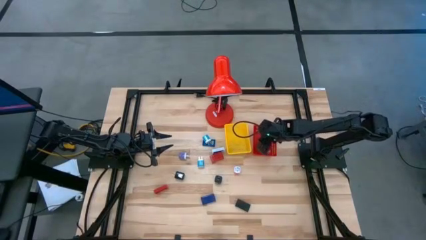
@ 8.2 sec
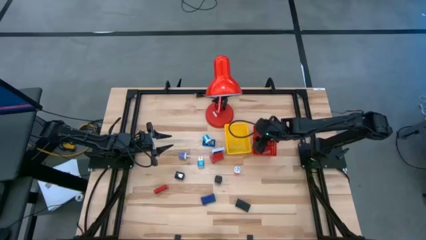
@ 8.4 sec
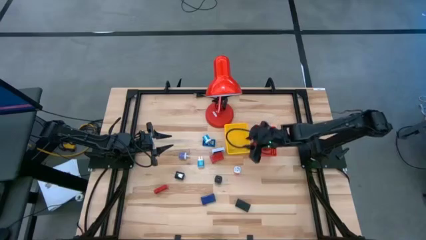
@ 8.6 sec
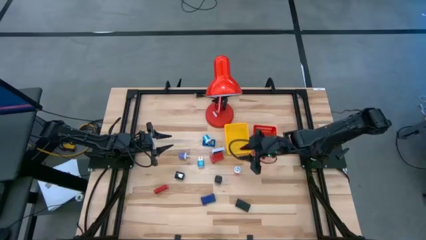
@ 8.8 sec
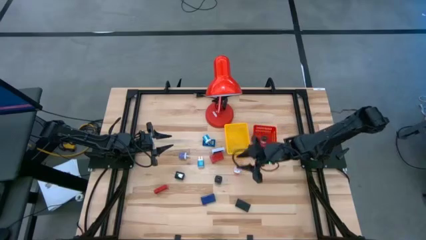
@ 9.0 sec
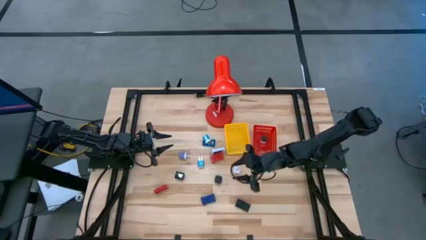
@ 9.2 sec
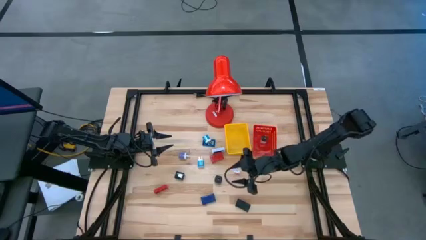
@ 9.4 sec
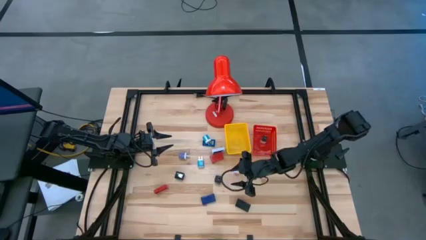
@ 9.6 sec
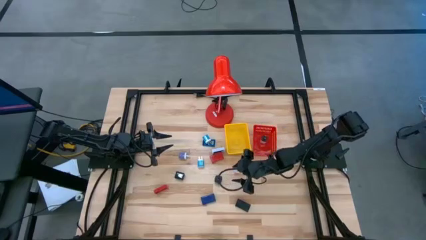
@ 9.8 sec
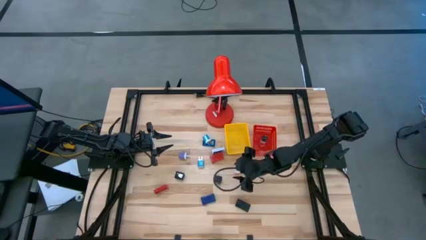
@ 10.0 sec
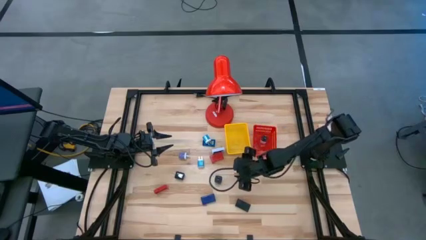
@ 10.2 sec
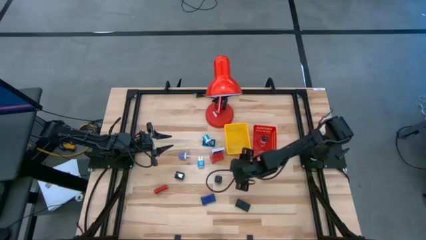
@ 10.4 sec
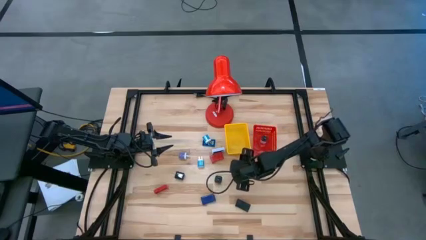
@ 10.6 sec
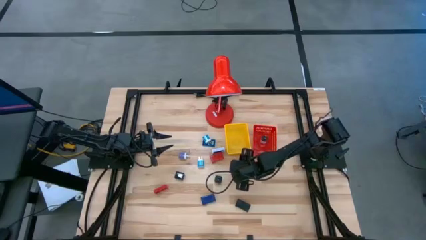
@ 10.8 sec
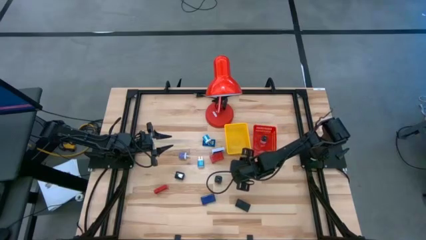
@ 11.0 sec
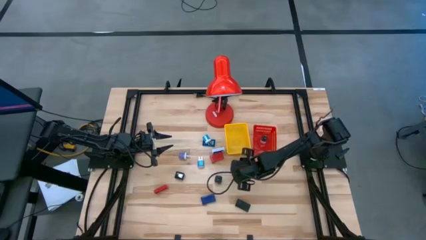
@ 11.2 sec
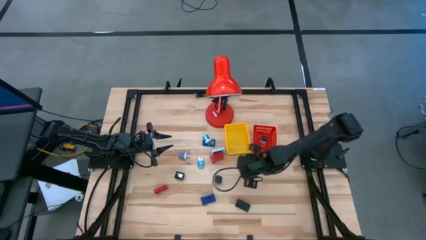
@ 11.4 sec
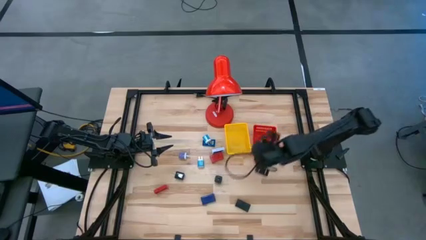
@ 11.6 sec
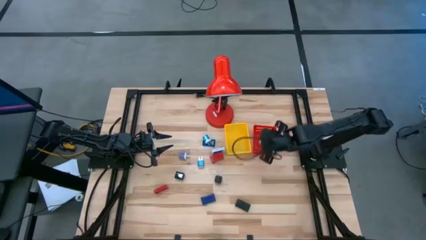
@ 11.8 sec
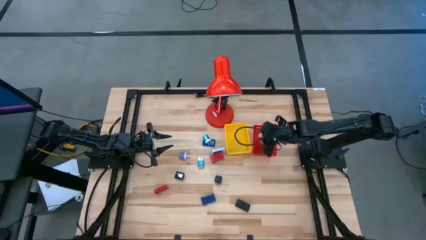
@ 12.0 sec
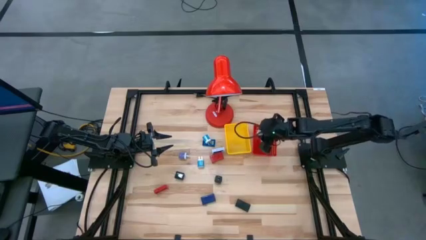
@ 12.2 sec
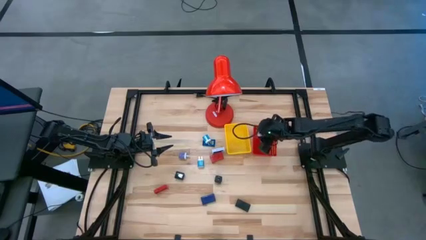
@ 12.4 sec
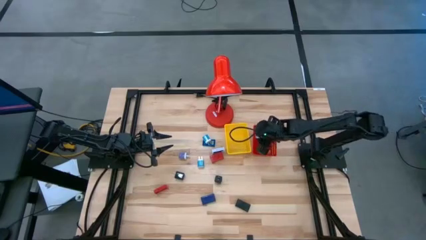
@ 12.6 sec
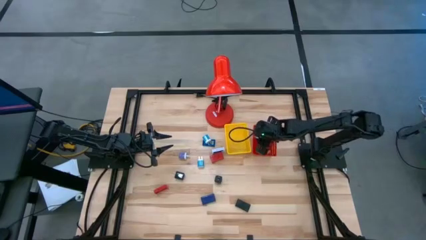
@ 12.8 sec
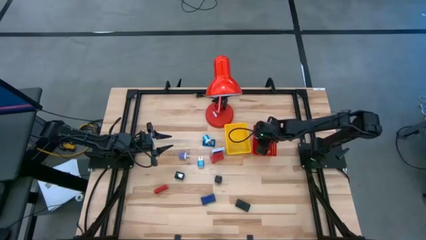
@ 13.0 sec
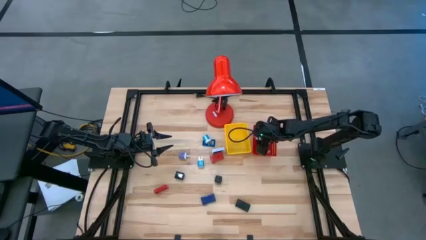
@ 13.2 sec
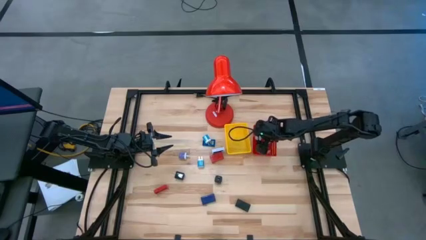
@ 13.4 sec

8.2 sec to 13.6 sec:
Task: Pick & Place Office items
Put the pink charger adapter into the red bin

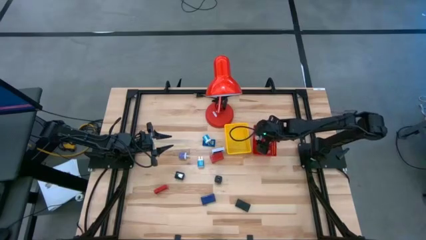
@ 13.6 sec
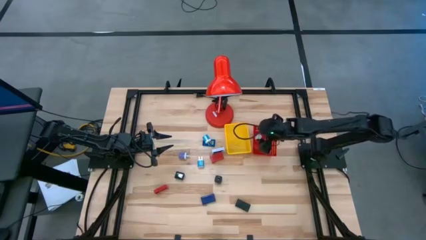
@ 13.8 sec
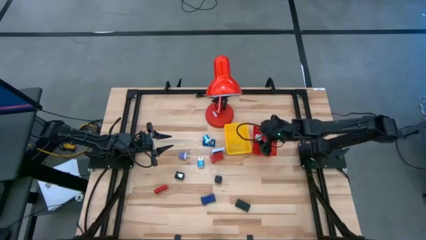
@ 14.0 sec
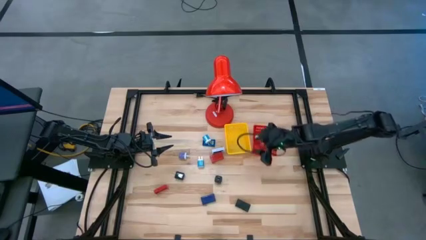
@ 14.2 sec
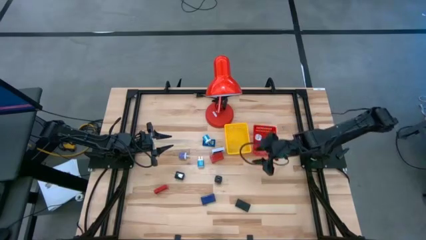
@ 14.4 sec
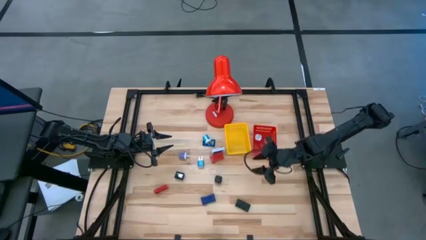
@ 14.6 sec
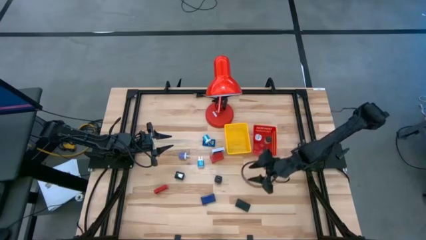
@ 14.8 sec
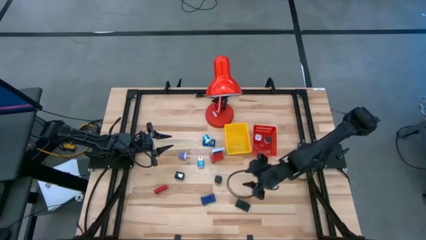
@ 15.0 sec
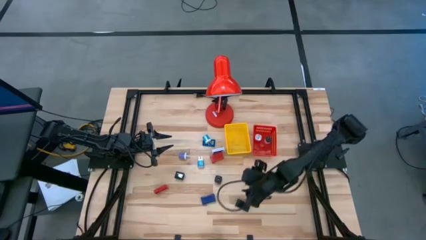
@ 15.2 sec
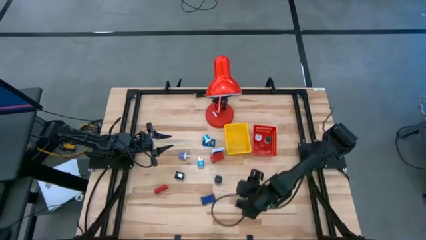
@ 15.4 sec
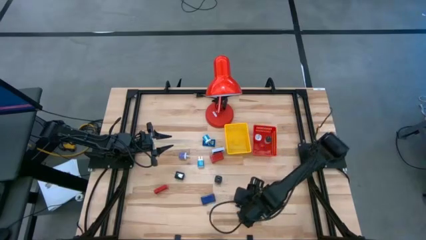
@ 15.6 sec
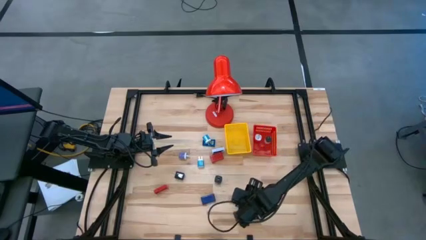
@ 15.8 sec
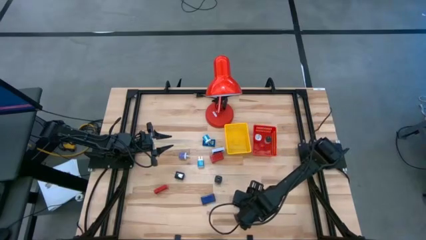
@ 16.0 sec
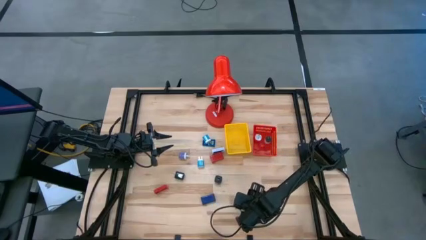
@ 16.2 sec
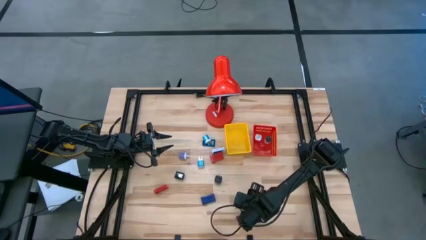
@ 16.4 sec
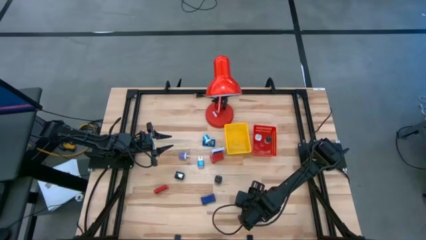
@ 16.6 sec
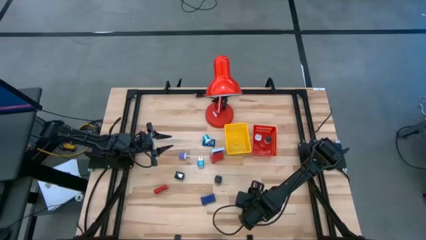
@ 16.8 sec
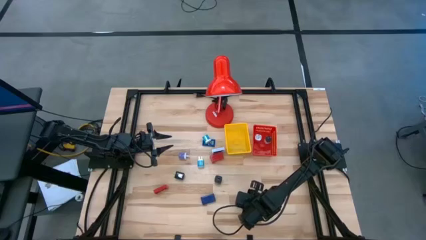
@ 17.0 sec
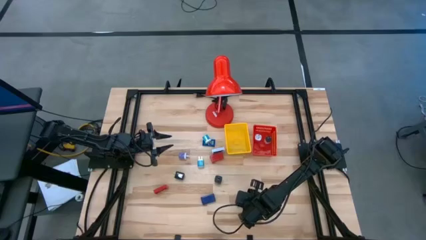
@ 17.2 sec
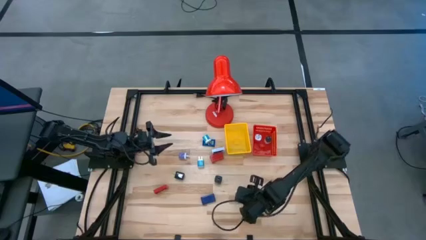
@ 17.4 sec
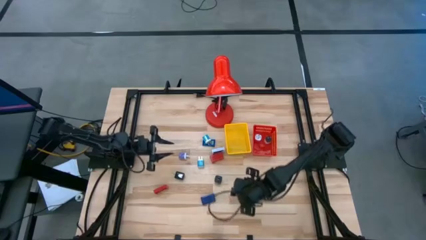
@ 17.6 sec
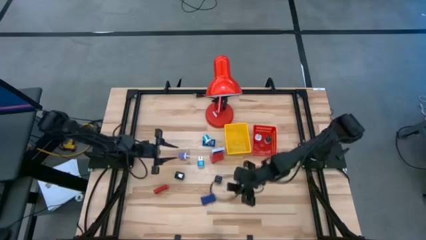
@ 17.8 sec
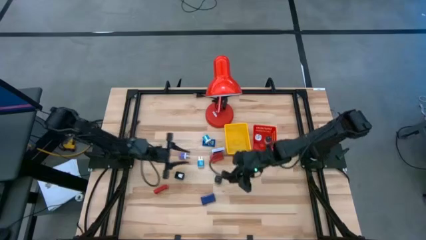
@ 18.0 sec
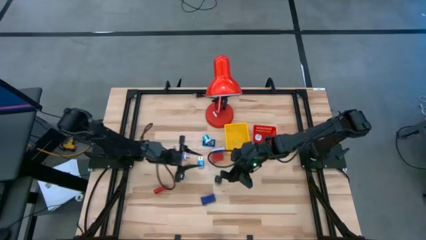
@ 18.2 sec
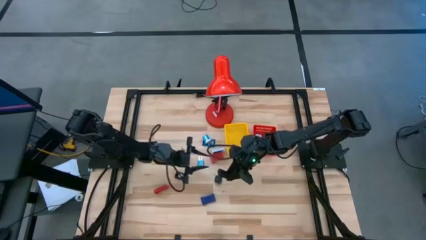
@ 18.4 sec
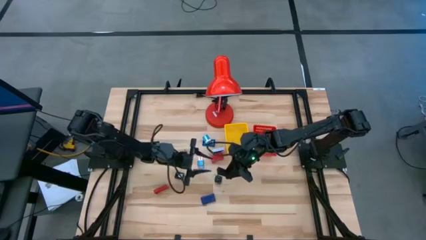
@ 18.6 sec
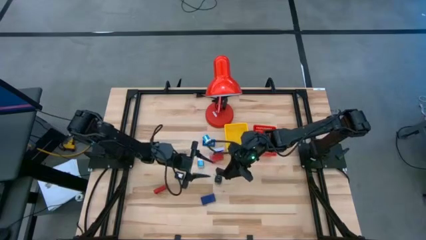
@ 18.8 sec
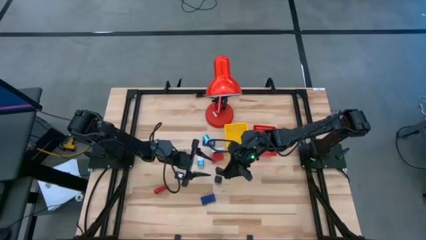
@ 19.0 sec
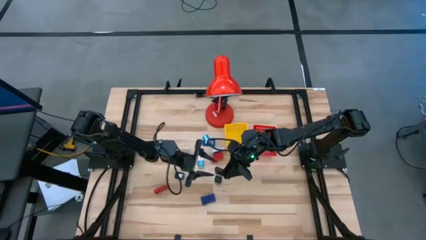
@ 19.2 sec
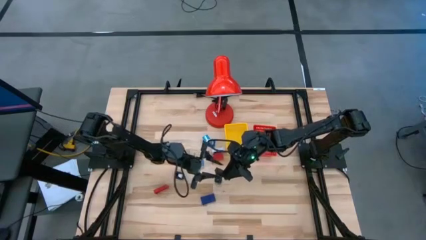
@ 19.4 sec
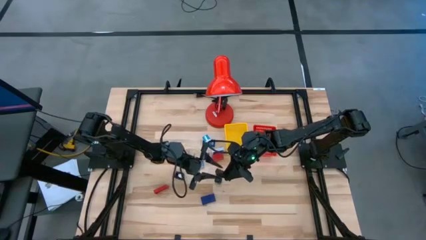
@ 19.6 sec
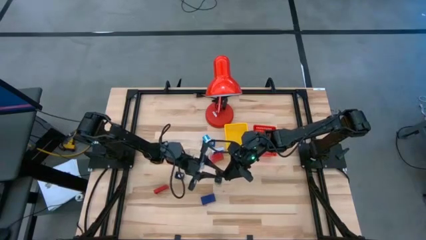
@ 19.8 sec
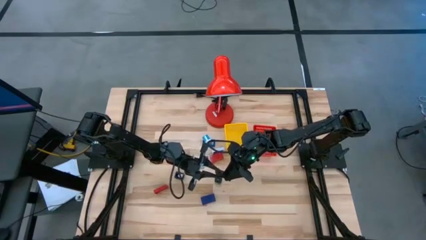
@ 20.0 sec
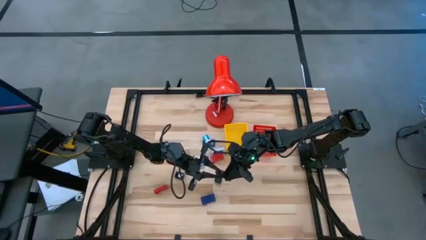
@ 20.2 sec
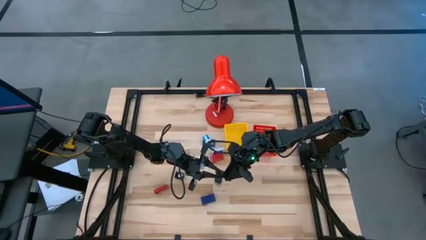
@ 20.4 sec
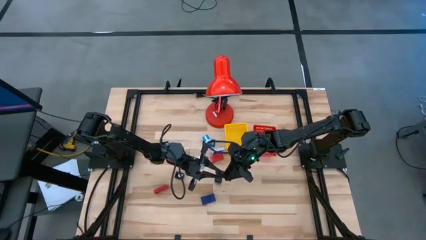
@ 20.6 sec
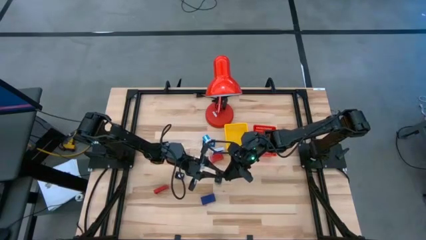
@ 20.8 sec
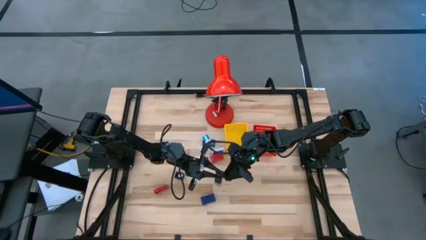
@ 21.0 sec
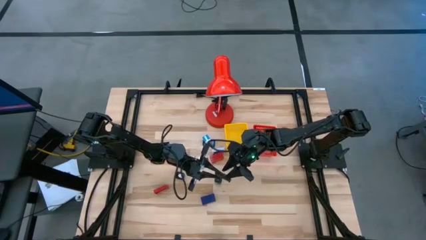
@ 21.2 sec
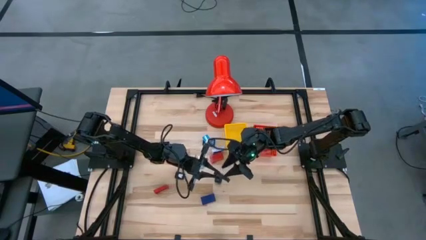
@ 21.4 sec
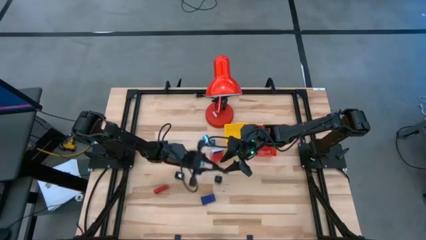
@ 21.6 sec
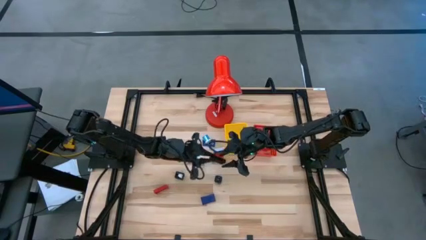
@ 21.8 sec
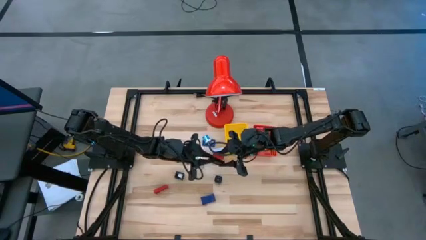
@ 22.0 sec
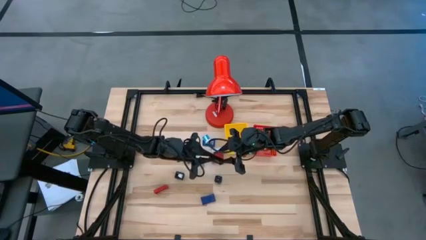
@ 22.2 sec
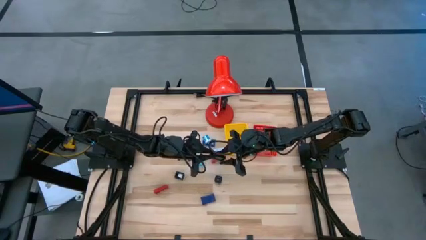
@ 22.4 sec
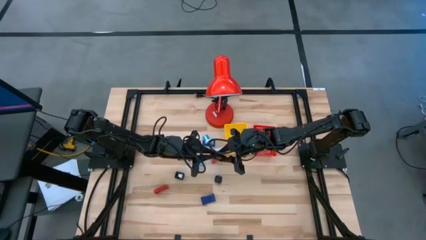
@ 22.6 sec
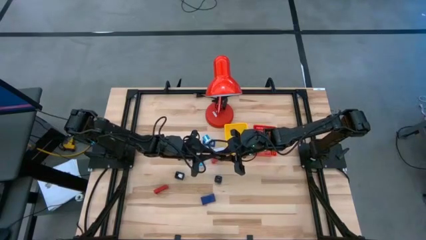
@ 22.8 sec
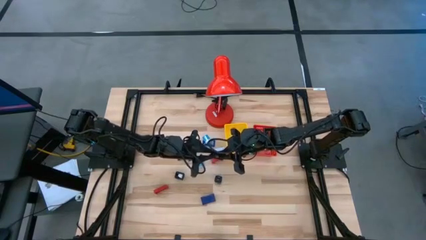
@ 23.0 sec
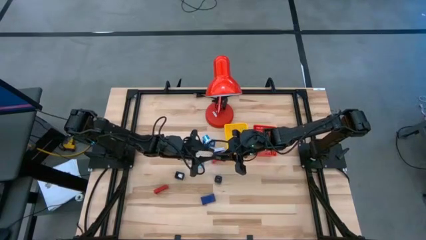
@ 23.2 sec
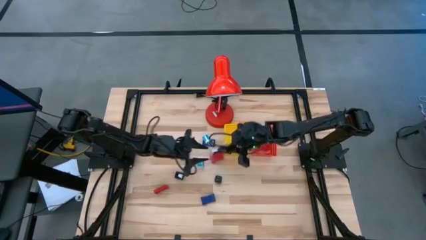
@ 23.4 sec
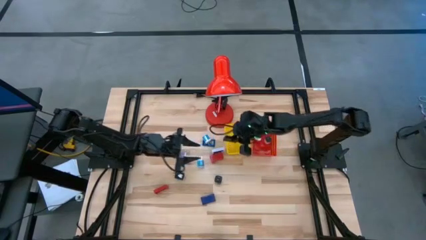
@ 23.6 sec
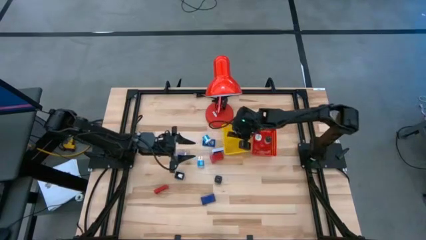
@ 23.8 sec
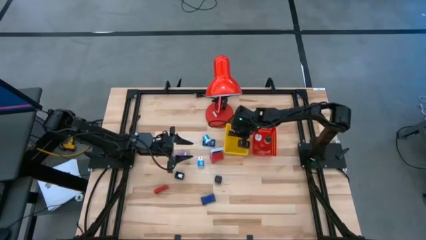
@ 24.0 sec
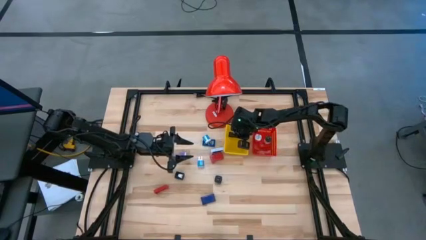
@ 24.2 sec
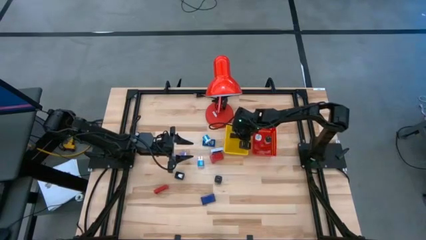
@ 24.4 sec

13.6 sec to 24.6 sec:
Put the black digital clock into the yellow bin
